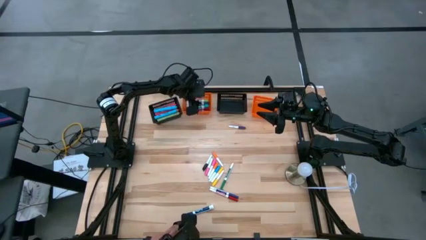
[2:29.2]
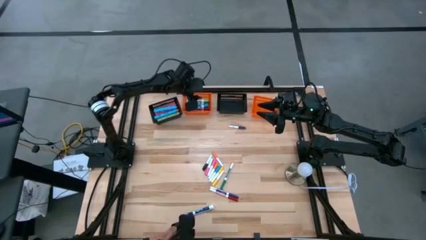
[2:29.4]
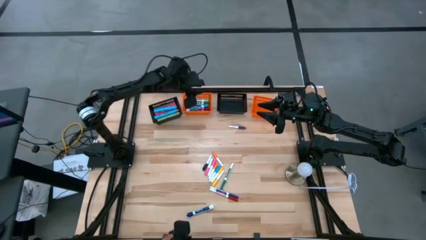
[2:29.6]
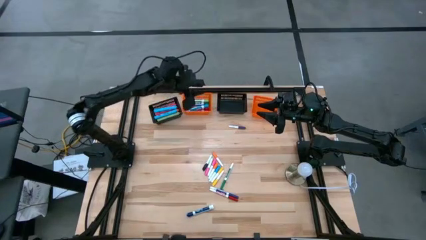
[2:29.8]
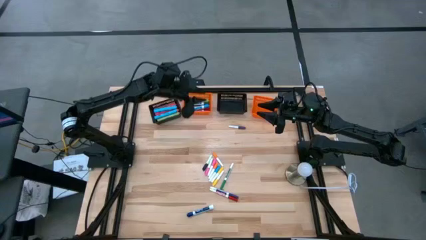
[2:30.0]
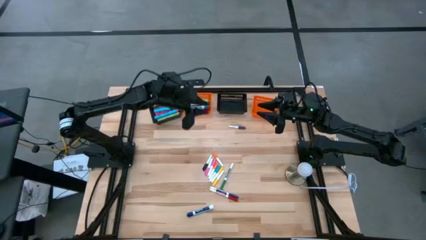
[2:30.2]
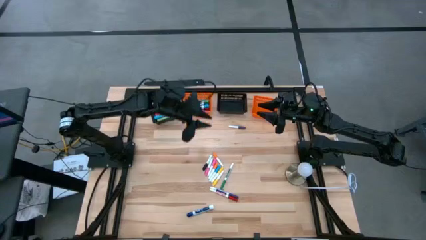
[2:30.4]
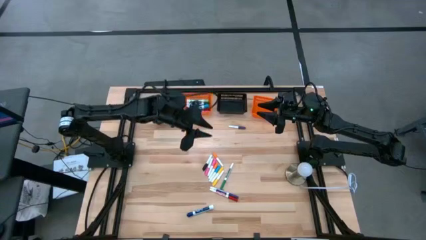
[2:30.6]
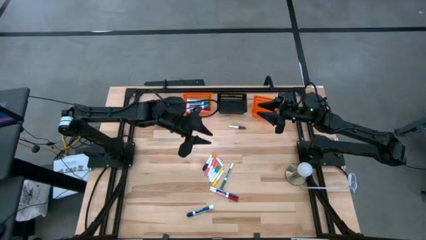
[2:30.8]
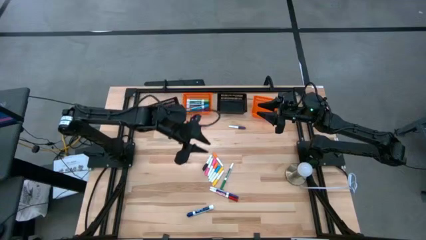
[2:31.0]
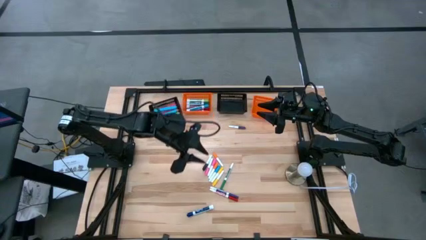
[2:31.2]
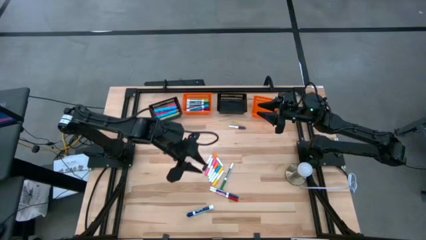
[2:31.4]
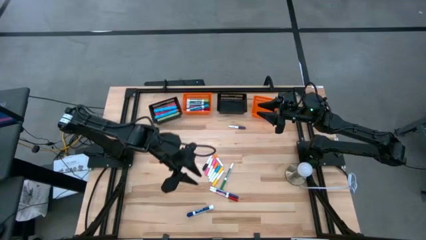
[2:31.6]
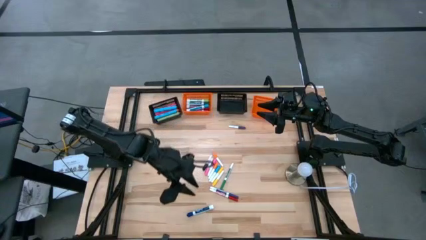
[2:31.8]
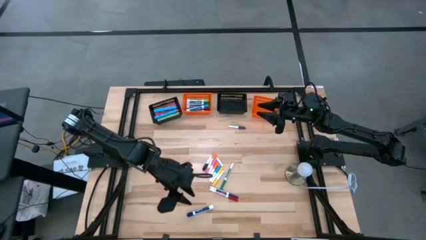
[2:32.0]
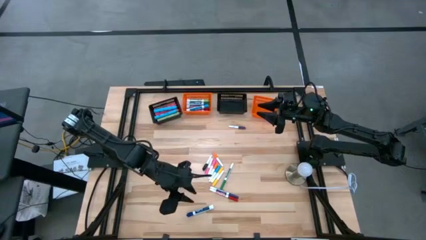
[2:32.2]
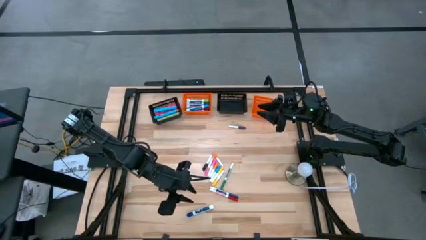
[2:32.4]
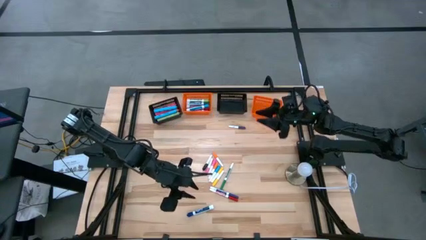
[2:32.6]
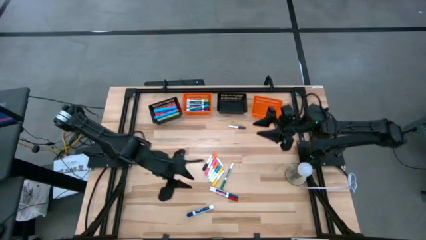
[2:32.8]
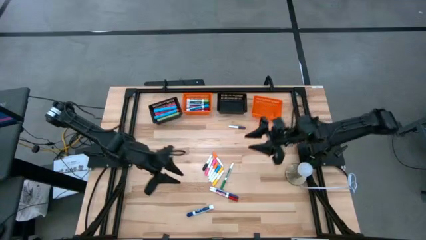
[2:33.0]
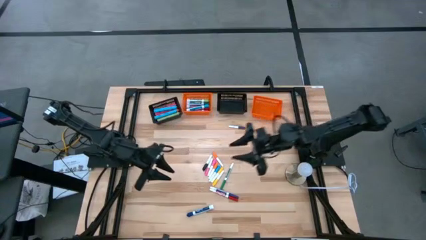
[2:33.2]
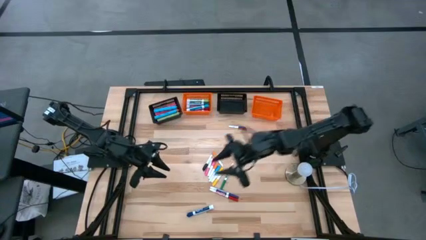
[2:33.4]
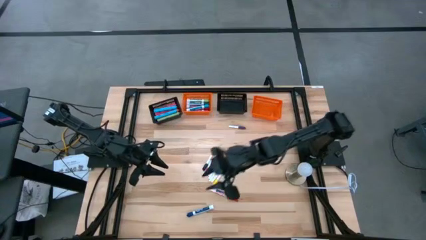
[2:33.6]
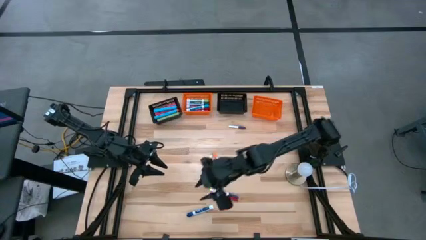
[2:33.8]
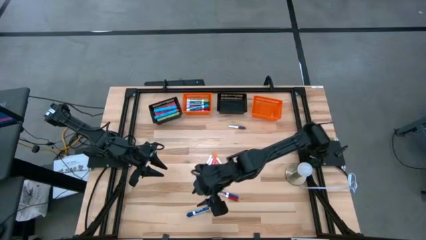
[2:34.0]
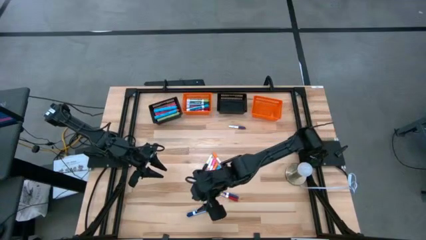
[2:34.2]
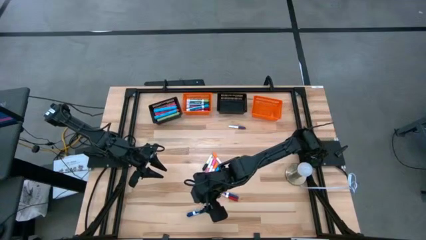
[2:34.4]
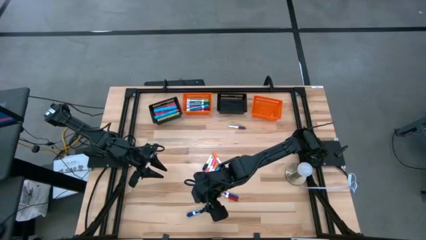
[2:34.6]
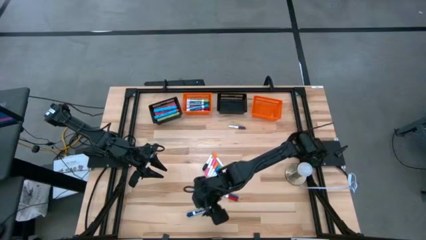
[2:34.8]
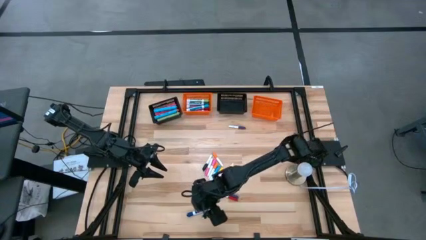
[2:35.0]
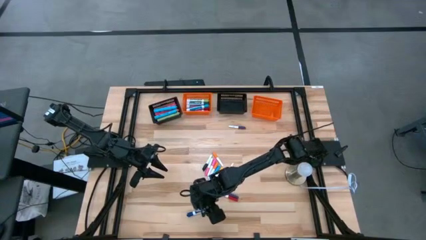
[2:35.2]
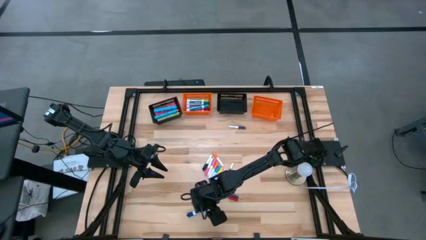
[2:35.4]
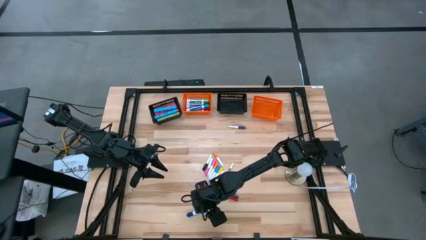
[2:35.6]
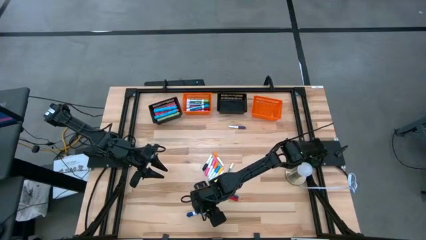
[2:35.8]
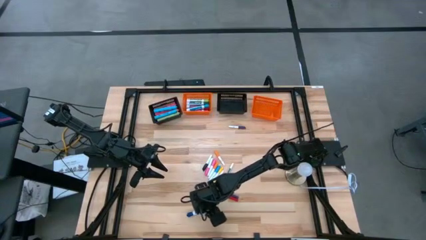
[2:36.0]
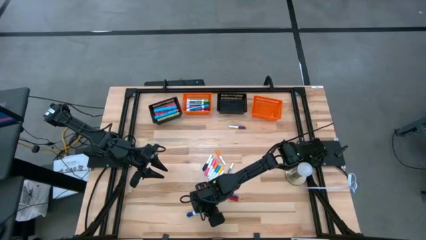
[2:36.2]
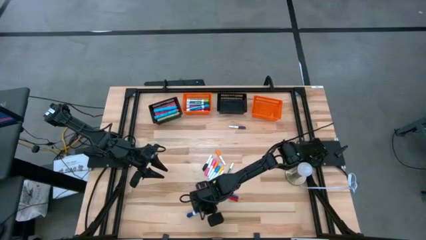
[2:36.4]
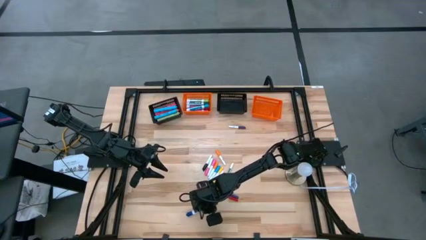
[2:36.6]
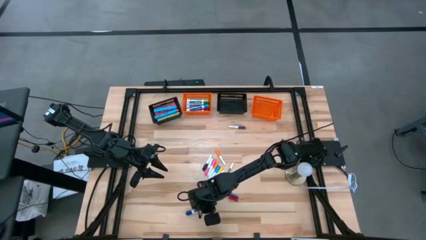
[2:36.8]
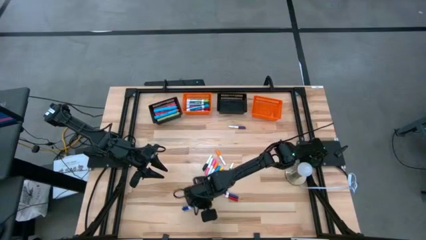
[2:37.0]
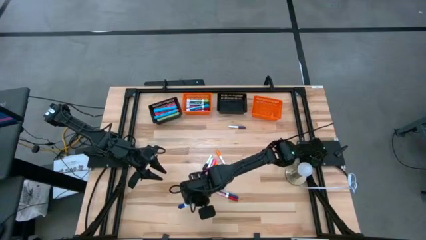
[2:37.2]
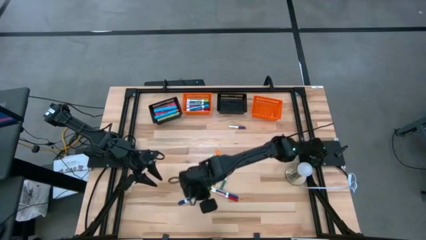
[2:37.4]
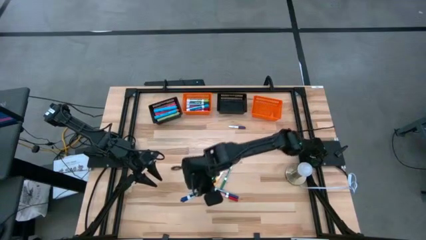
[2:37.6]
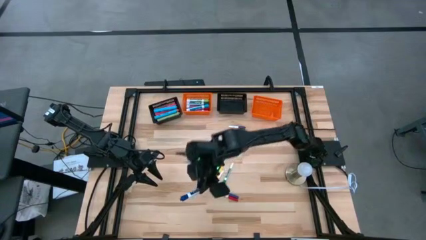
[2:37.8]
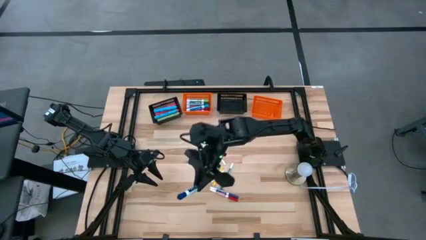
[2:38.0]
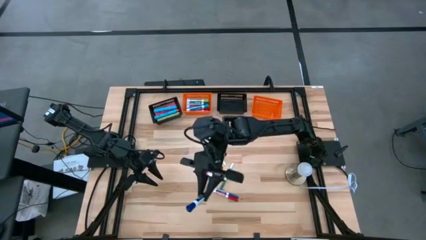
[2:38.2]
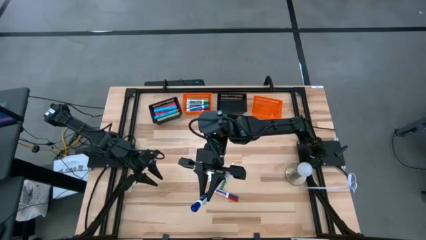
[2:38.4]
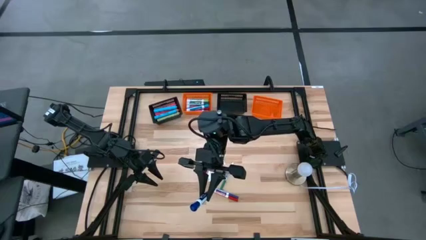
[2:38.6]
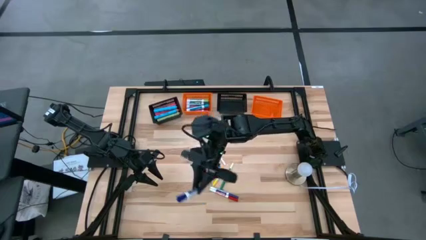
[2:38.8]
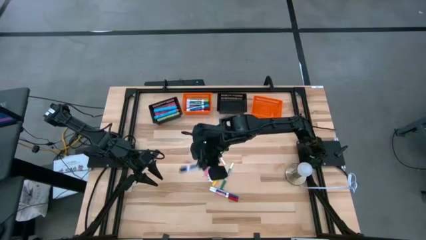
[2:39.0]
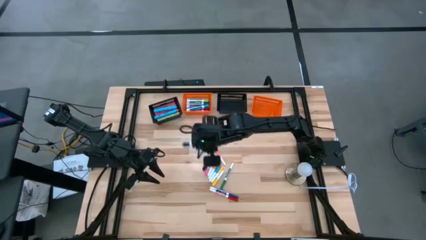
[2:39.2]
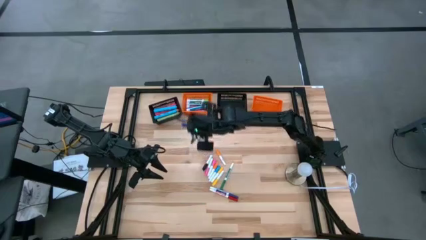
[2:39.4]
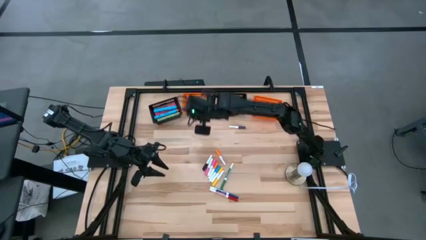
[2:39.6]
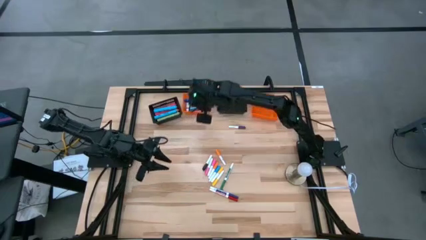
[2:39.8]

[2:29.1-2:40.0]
Task: Pick & Place Markers
Put the blue marker pen into the left orange bin

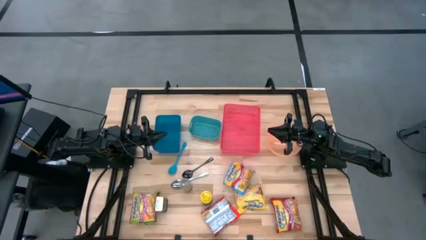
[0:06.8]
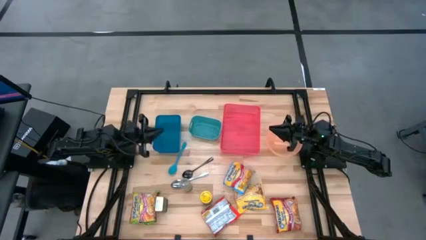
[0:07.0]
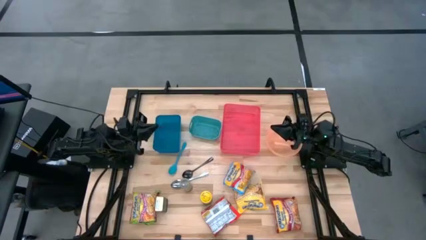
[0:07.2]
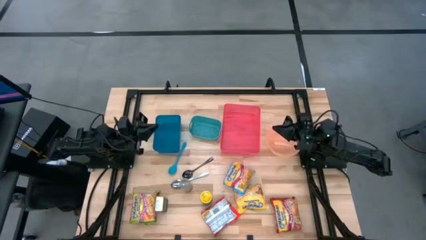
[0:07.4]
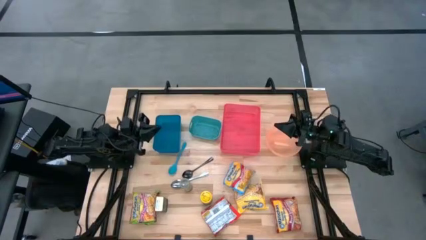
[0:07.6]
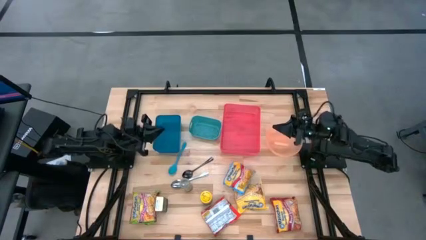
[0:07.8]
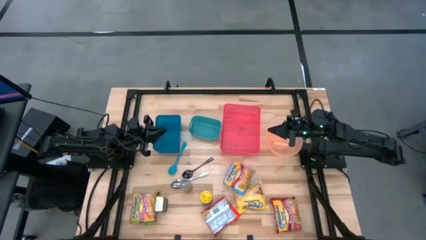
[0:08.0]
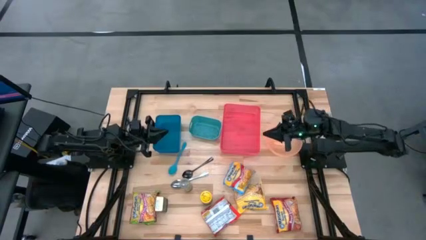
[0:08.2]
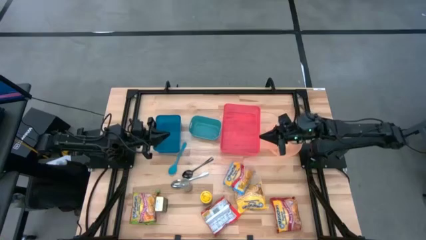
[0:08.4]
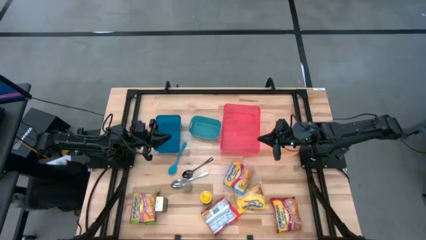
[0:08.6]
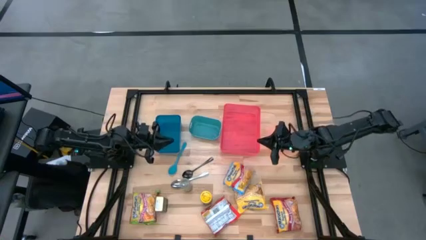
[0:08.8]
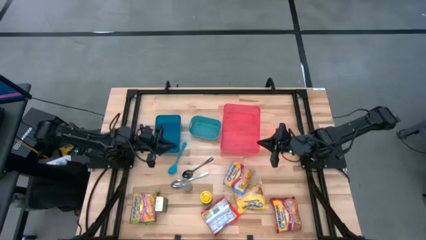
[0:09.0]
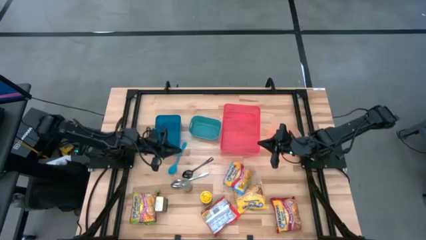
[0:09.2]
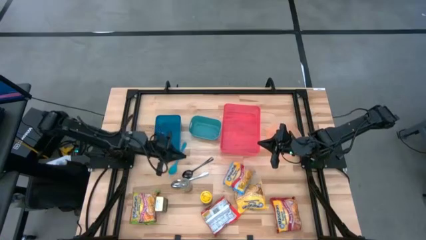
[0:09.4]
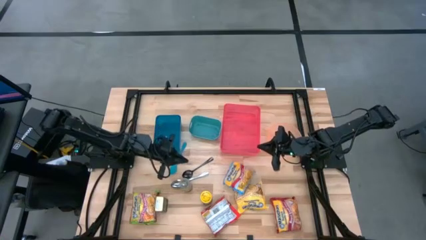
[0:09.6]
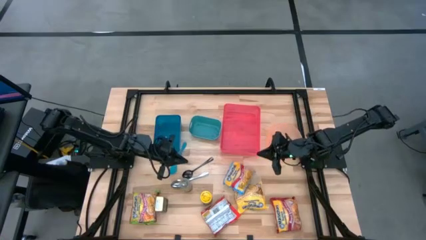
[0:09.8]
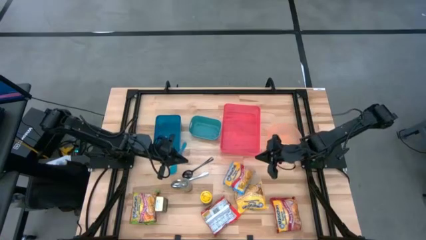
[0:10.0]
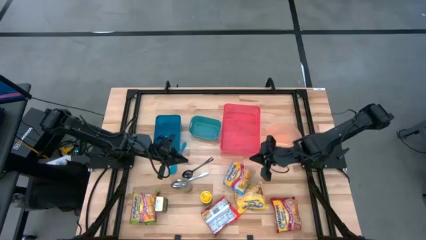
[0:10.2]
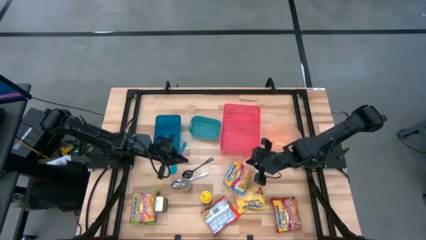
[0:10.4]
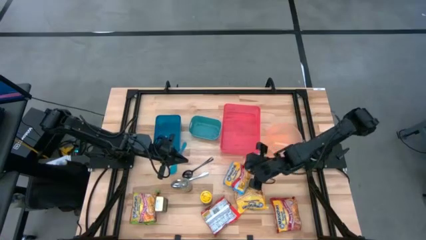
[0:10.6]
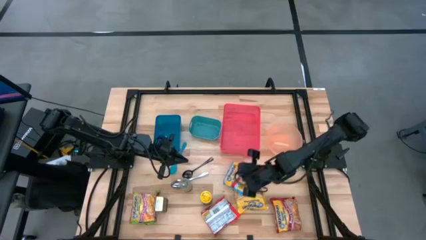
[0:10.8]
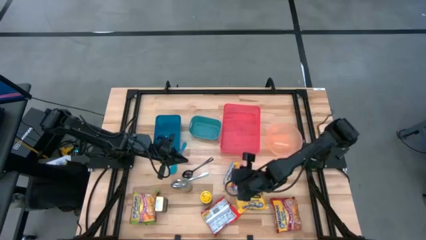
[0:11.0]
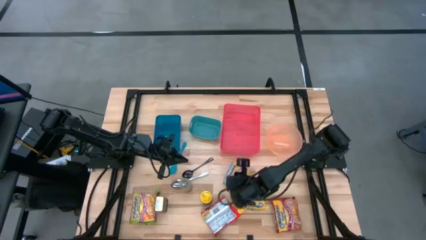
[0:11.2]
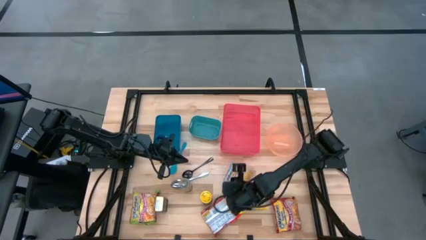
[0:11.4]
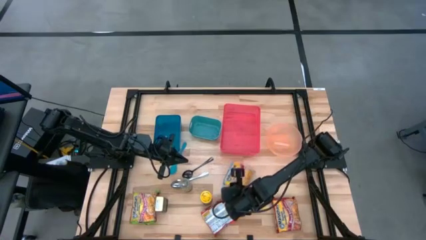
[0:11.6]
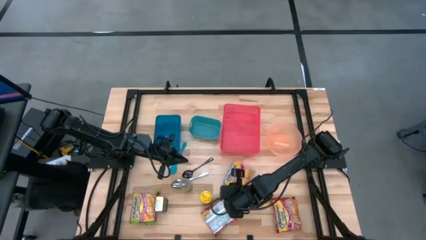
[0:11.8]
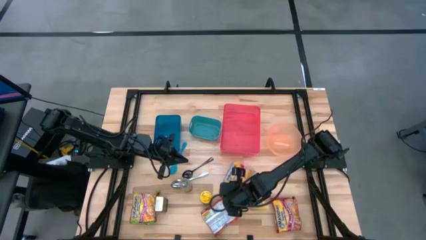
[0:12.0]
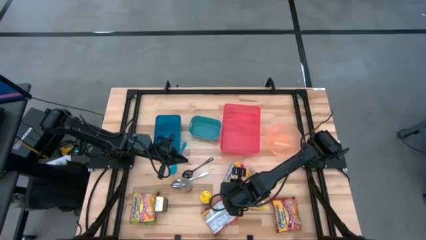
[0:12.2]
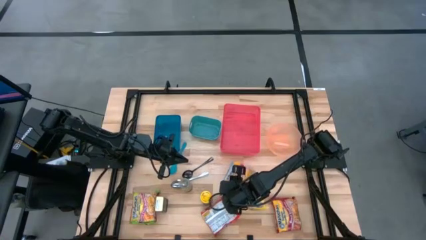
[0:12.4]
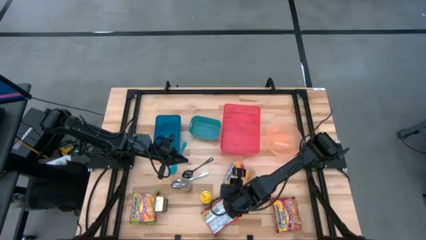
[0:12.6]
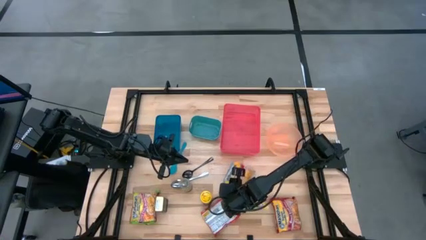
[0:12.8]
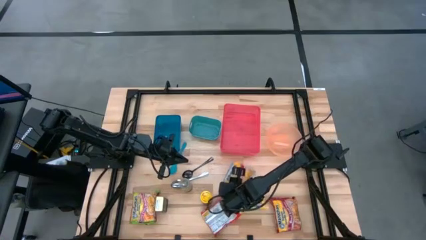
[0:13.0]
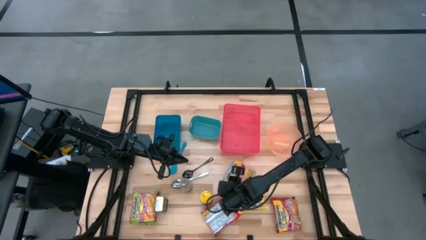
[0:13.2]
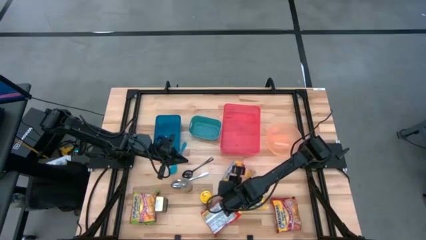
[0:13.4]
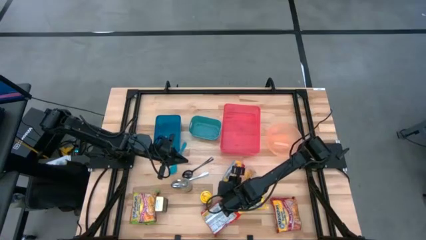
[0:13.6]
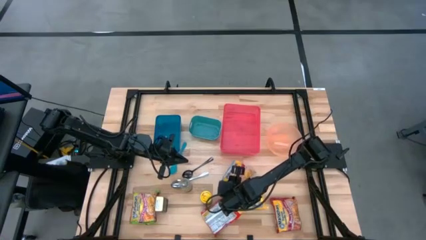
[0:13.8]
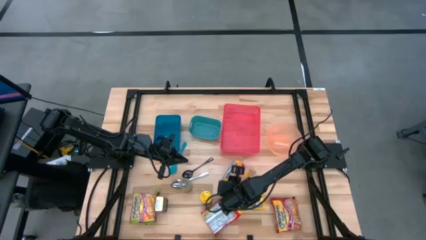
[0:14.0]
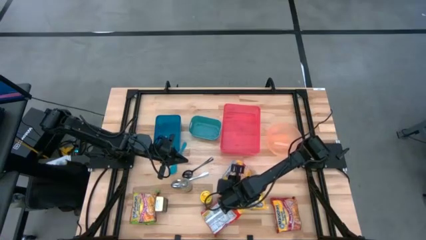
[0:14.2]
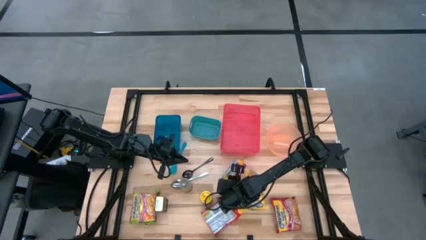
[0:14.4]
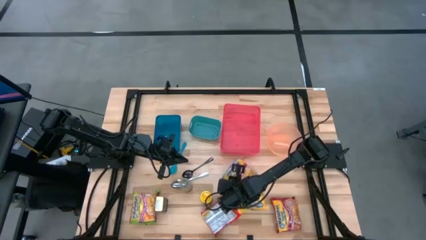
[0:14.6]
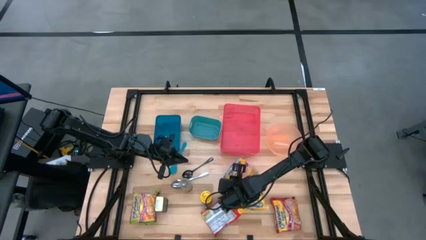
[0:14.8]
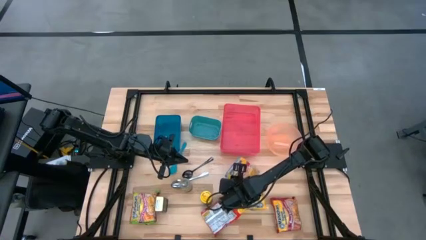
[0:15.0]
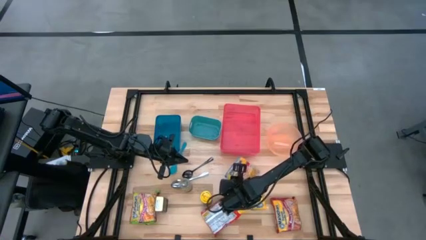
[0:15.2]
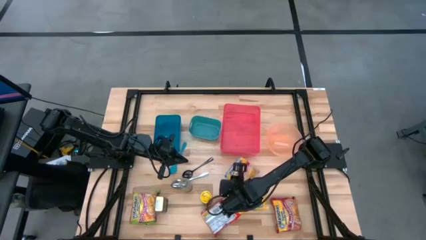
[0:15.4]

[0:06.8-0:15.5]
Task: Pick & Place Food Item
Put the light blue noodle pack into the red bin
